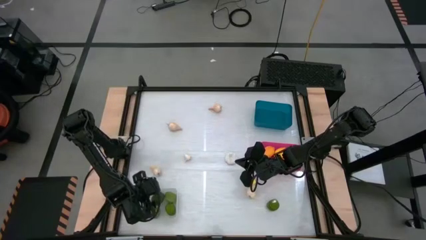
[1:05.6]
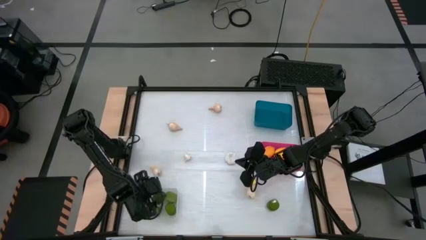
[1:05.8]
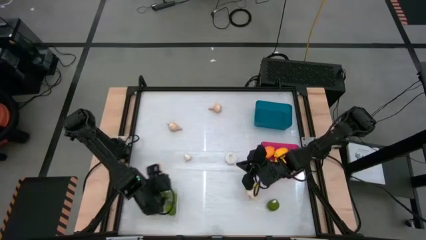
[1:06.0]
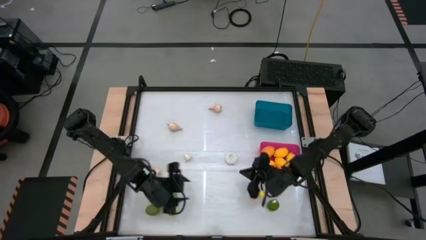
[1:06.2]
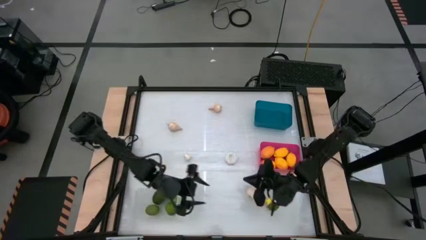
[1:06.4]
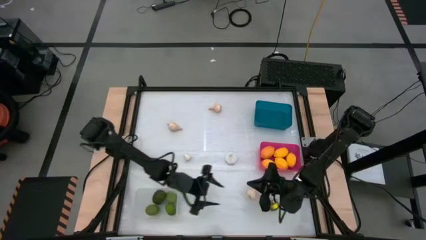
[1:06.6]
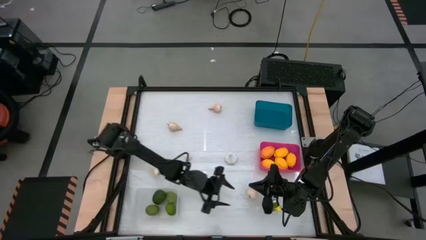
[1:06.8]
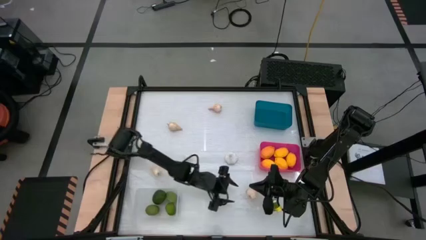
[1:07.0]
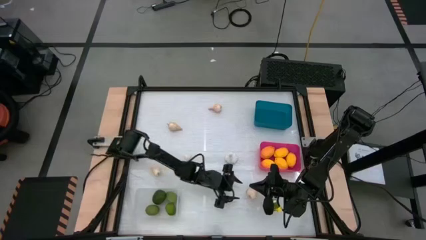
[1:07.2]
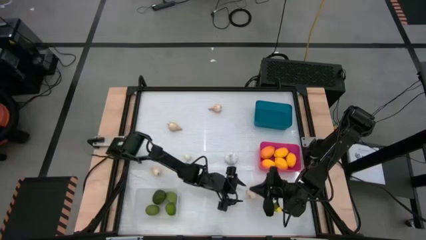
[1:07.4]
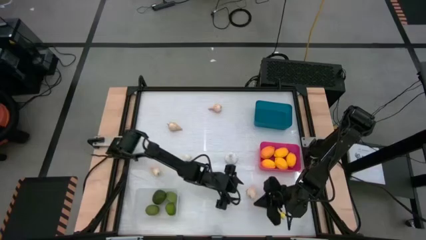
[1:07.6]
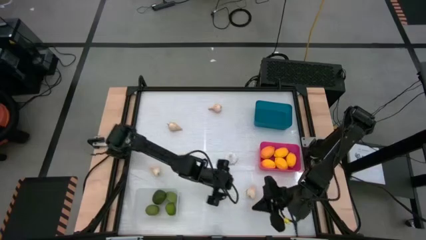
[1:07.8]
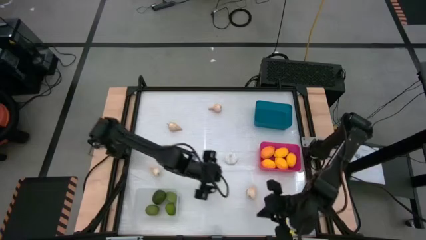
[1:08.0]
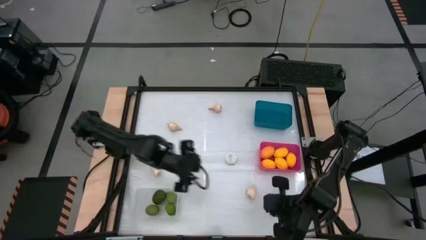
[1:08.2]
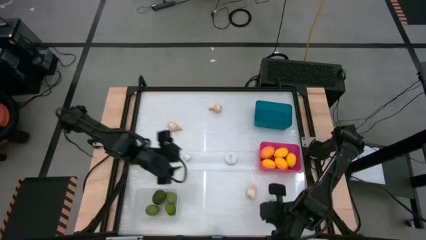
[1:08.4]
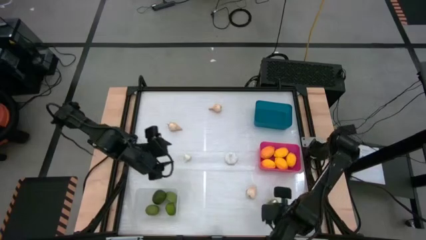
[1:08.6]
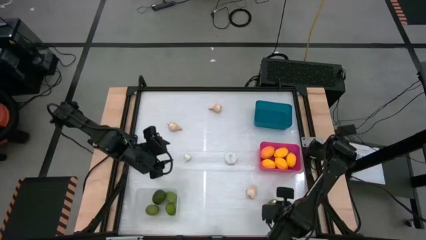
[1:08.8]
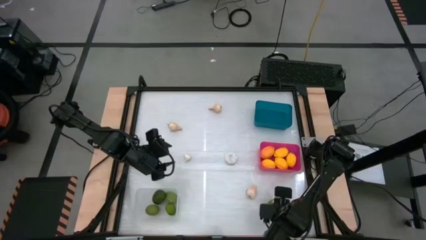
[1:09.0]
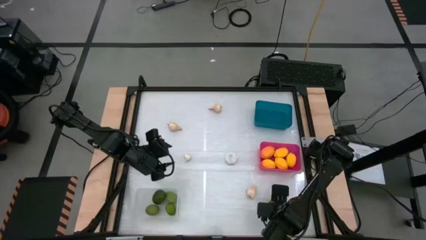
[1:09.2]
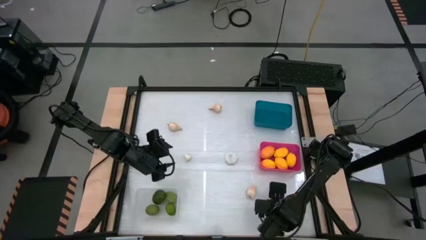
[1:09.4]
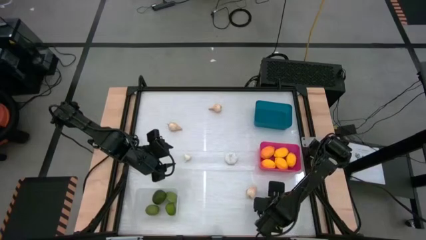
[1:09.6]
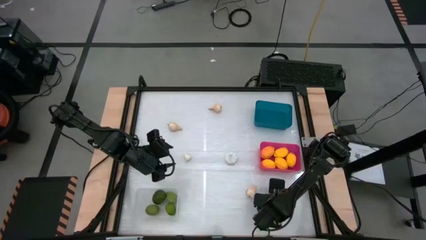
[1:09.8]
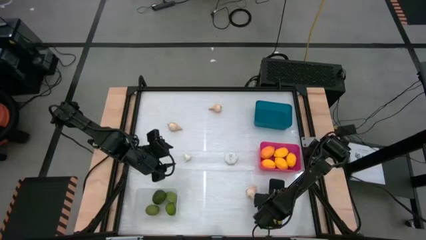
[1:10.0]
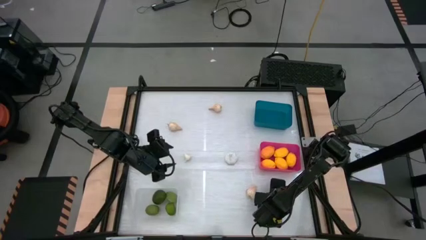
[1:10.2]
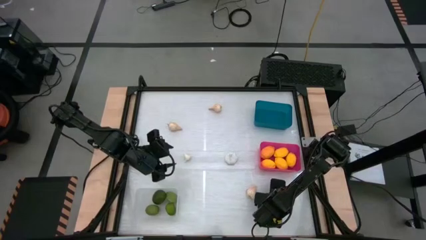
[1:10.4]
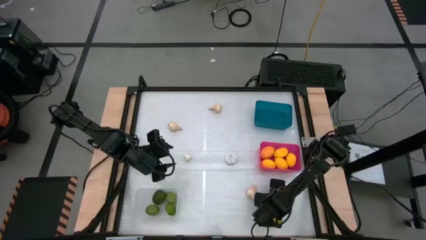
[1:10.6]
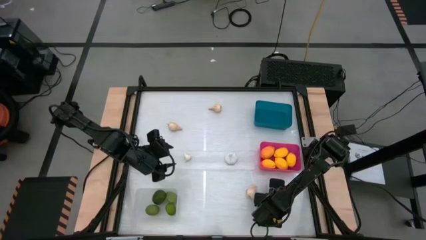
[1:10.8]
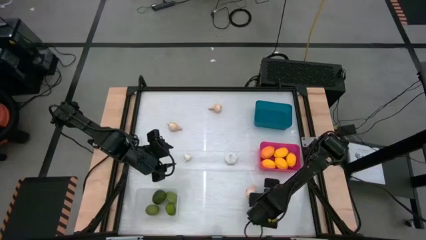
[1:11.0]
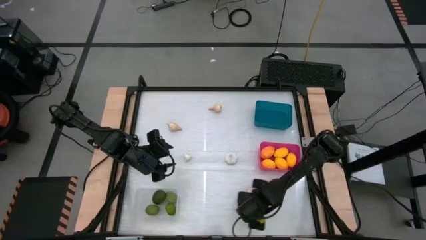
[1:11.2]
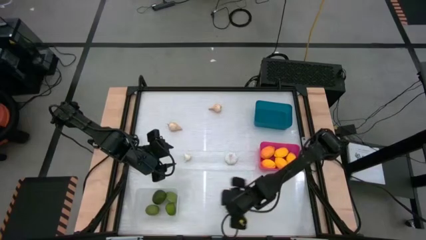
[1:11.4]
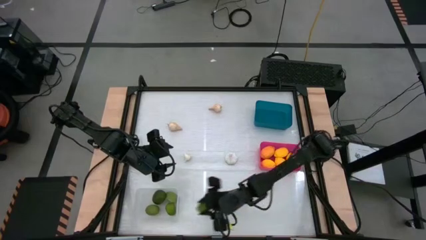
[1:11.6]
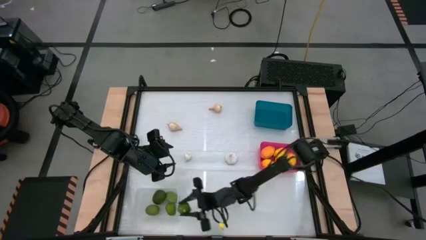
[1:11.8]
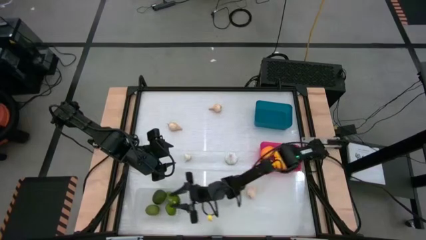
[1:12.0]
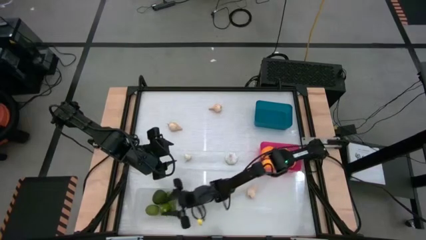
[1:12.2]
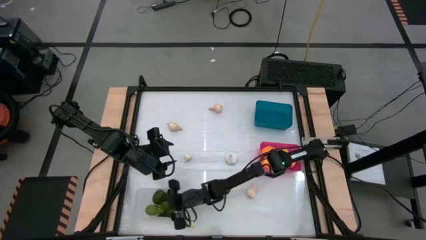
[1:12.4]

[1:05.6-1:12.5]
Task: Sort produce into baskets
Put the green lime into the transparent bin

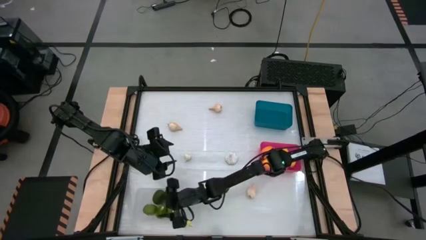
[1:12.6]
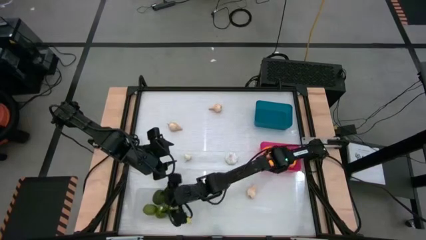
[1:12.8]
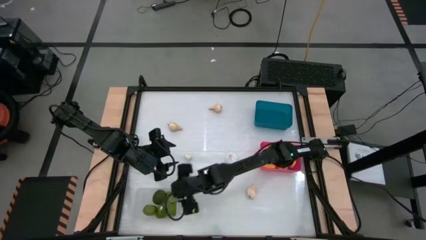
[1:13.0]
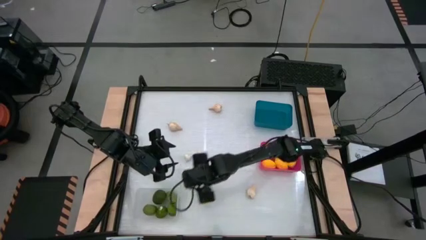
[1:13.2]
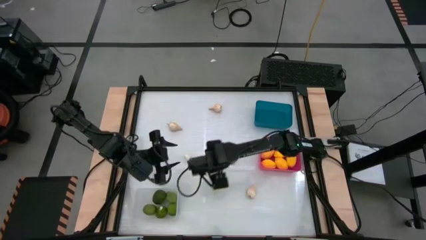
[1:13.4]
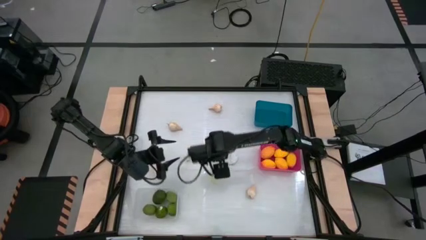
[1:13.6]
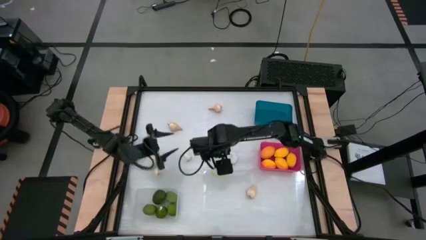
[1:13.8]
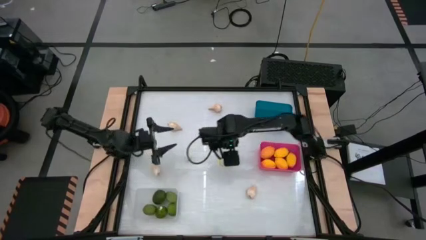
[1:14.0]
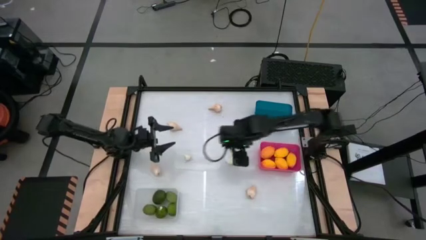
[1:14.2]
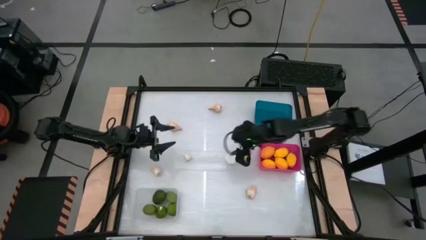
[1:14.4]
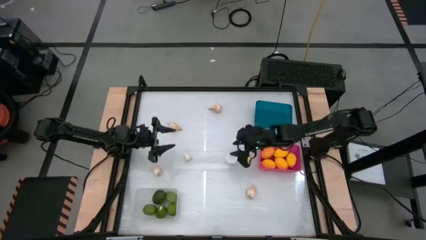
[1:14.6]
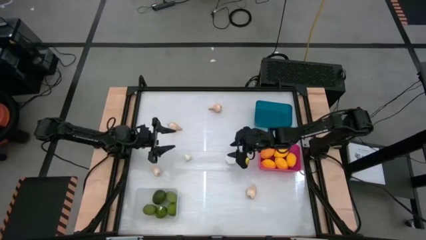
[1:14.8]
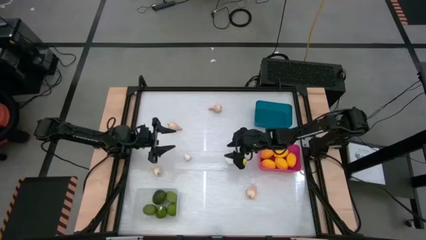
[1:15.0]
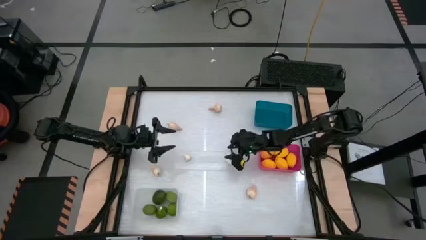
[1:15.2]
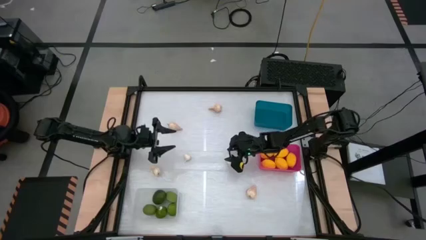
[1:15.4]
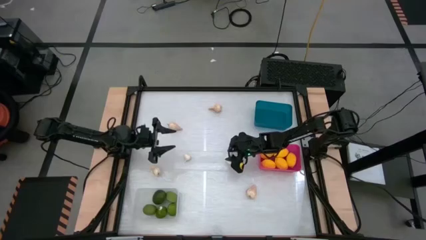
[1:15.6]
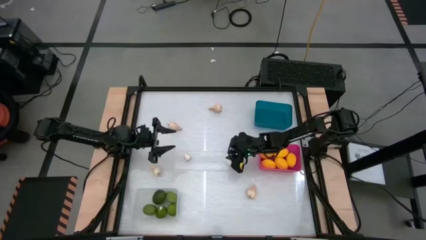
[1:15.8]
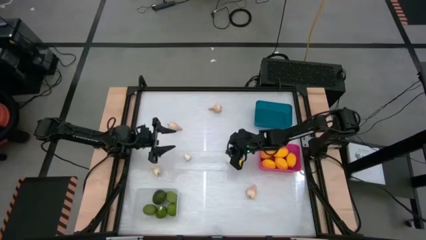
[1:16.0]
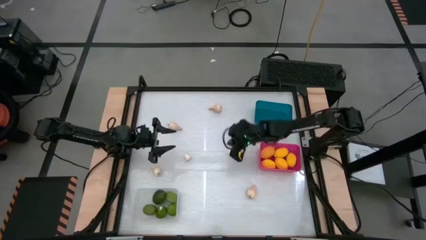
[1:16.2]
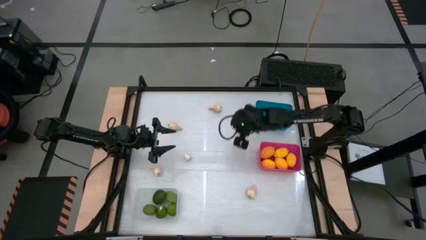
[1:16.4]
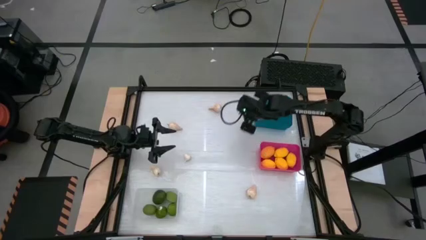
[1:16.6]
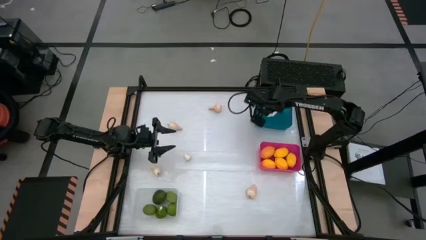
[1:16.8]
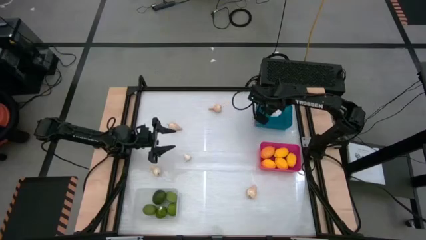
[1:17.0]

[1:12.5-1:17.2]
Put the white garlic into the blue bin

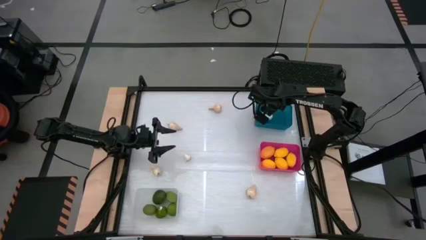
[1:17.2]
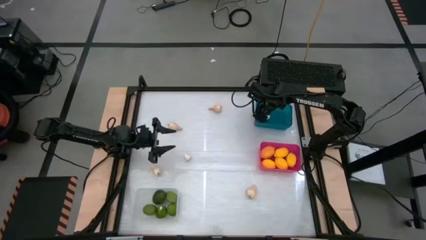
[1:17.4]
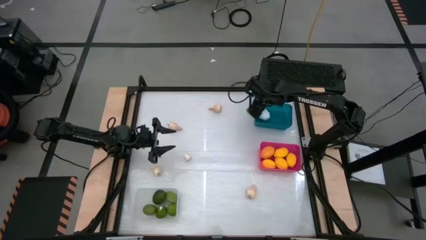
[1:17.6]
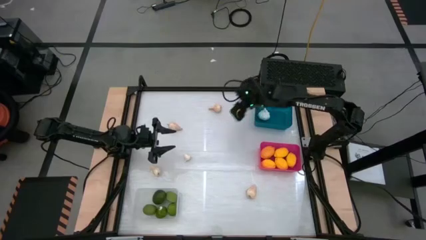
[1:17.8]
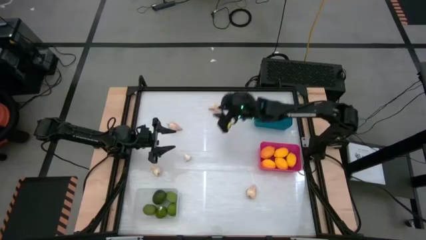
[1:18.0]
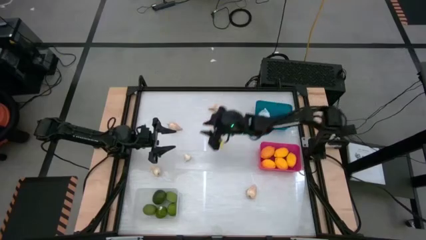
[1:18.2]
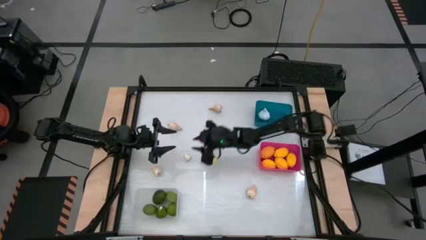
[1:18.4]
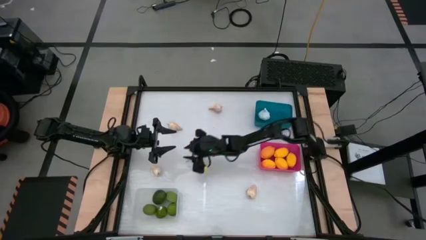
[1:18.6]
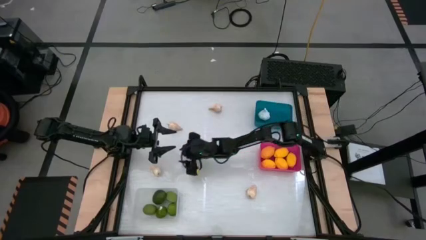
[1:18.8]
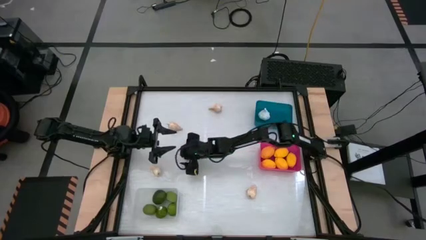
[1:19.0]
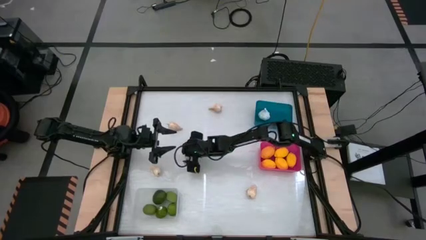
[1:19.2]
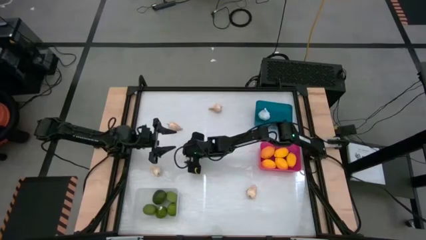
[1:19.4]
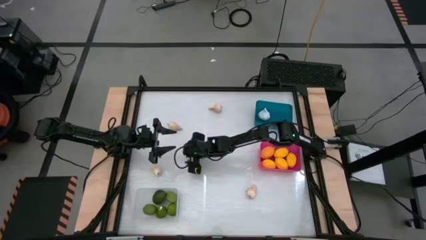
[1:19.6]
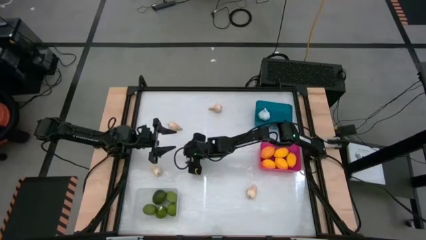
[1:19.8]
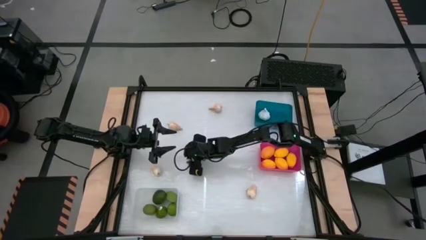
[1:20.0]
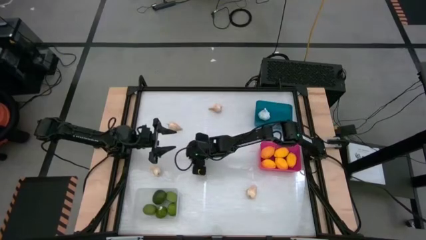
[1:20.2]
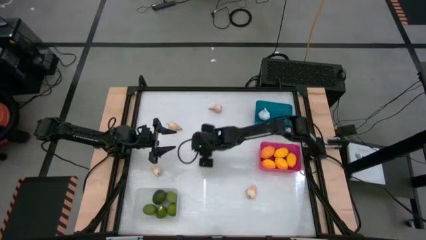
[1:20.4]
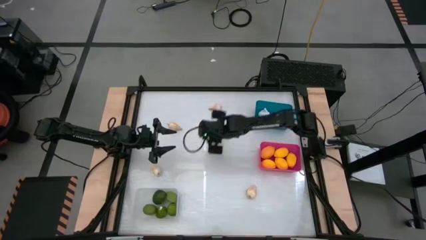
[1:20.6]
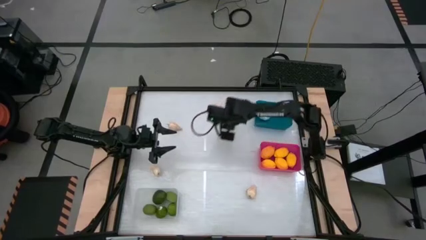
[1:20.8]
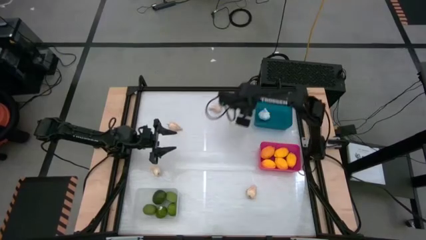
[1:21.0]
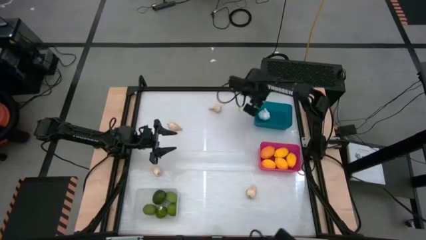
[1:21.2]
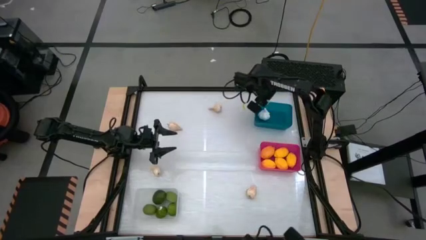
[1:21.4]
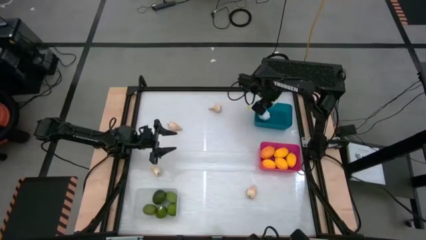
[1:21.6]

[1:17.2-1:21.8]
Put the white garlic into the blue bin

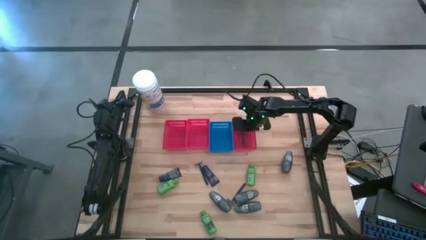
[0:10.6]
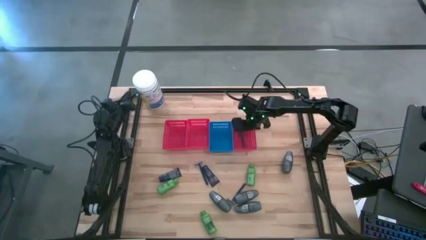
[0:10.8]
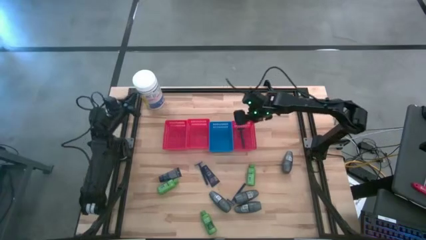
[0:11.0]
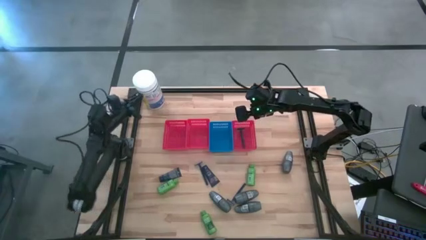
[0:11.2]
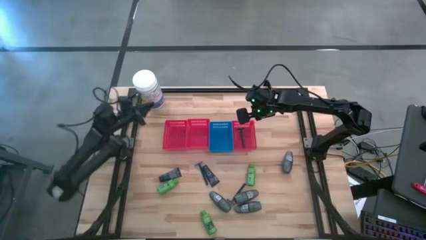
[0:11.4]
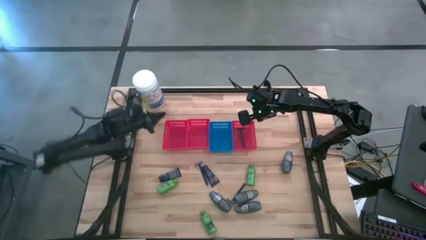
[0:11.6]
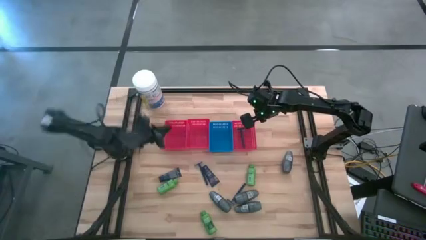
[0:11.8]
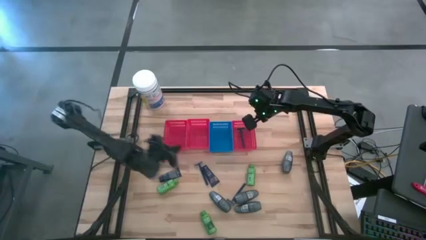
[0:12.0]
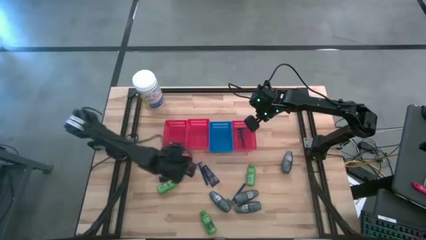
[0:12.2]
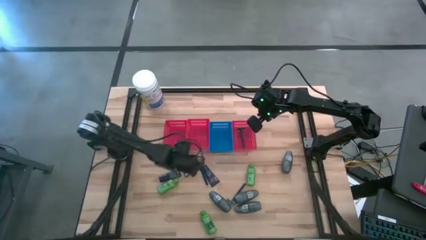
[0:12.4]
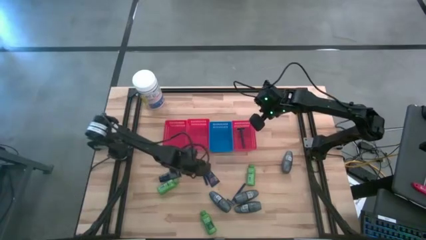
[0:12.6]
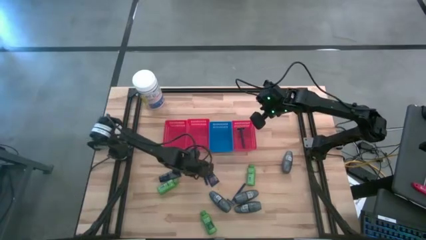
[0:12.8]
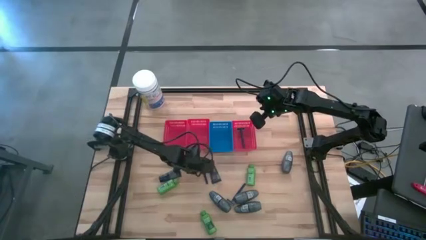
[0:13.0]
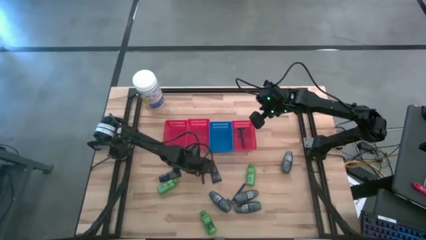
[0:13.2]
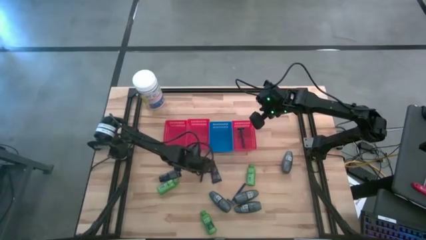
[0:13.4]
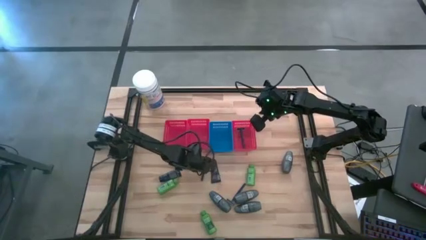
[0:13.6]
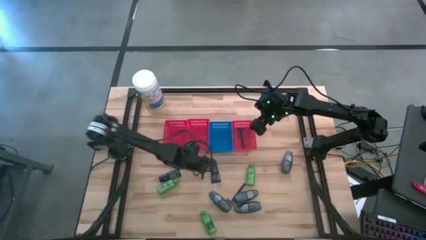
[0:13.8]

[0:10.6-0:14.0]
Task: Pick & Place Travel size toiletries
Put the blue razor into the right red bin
